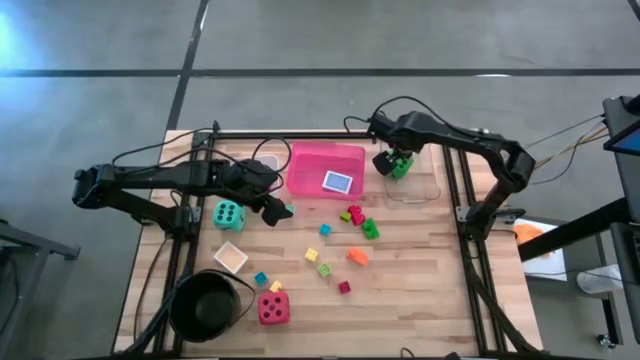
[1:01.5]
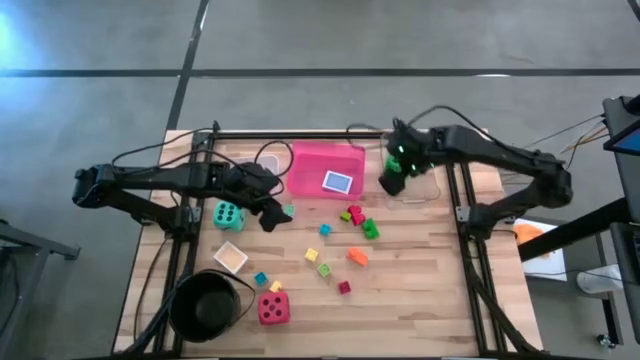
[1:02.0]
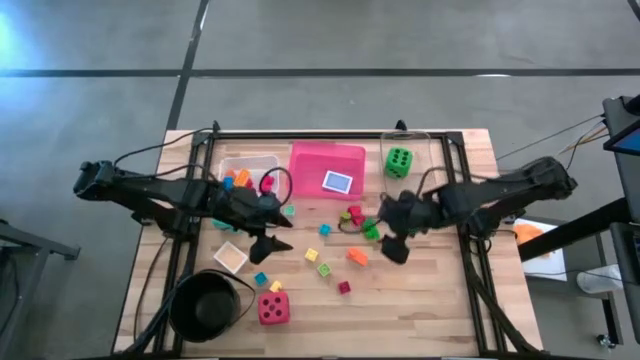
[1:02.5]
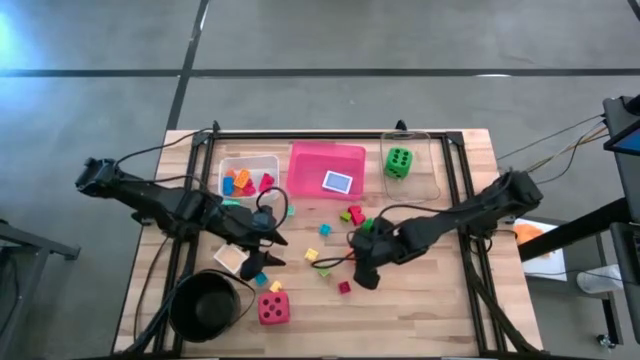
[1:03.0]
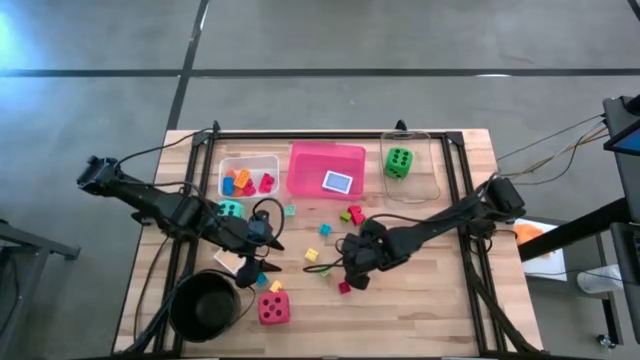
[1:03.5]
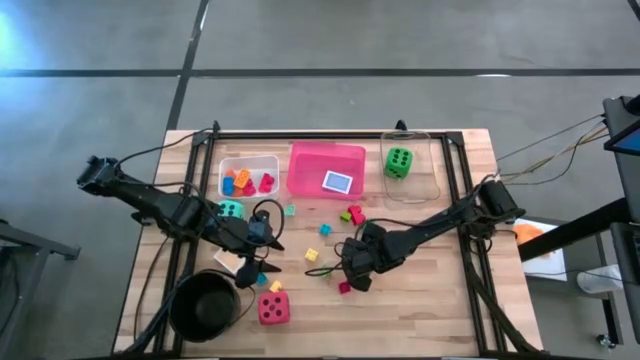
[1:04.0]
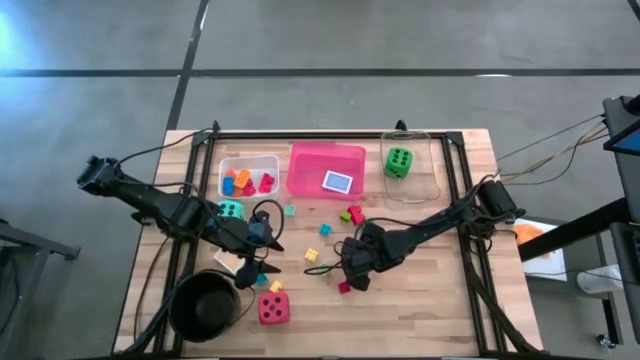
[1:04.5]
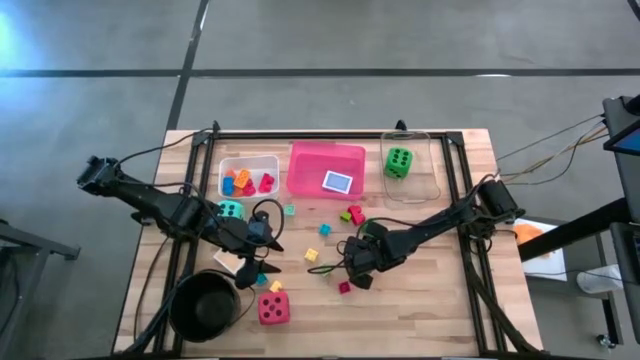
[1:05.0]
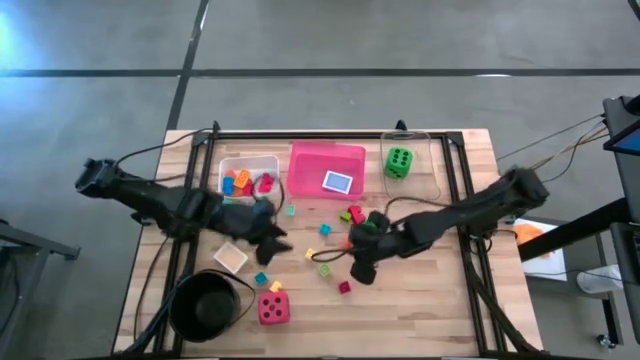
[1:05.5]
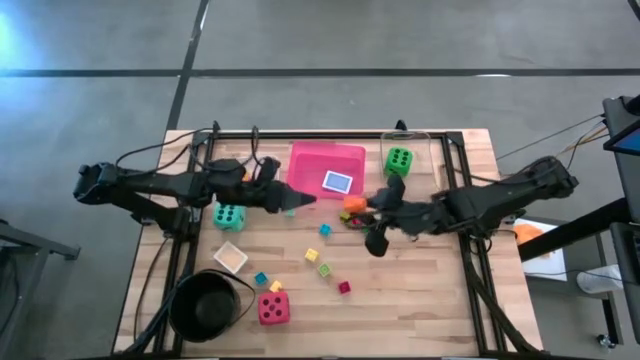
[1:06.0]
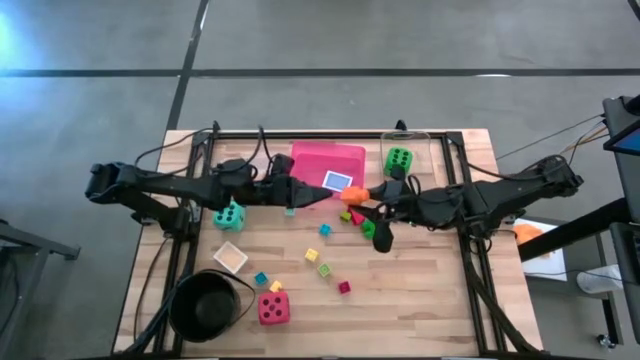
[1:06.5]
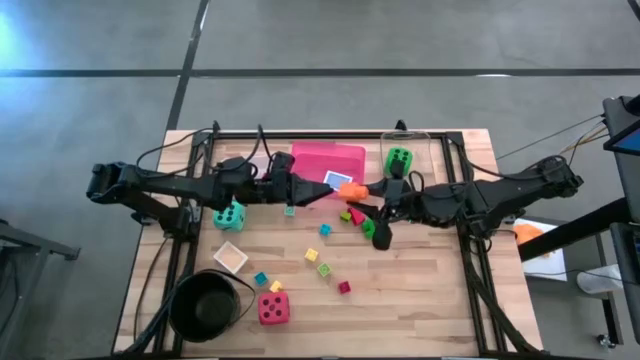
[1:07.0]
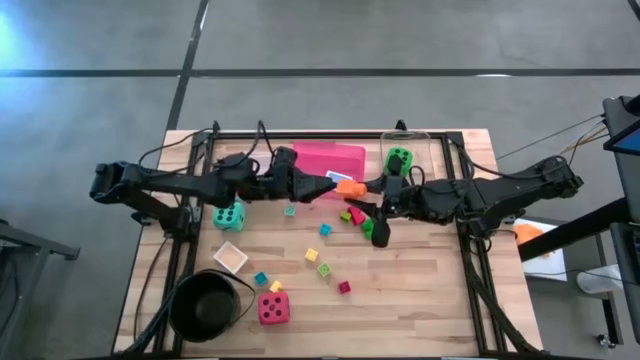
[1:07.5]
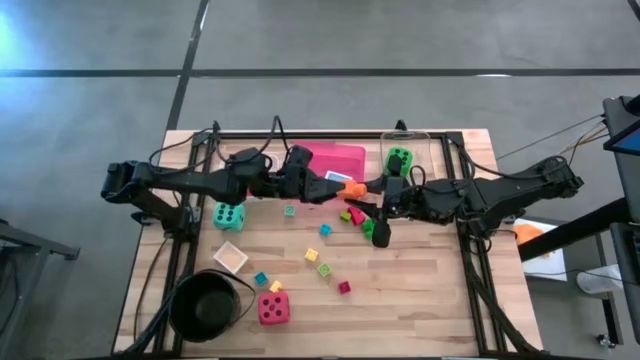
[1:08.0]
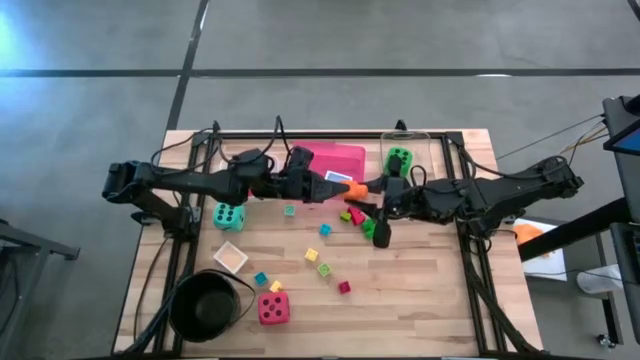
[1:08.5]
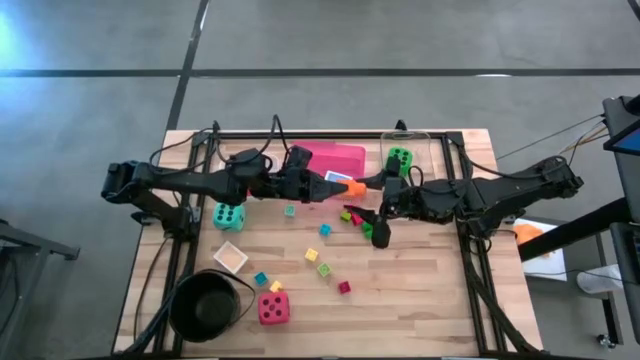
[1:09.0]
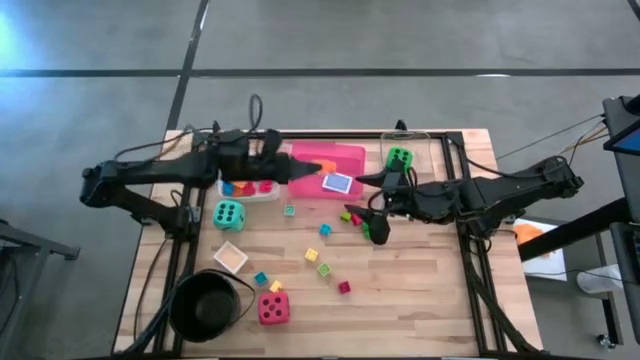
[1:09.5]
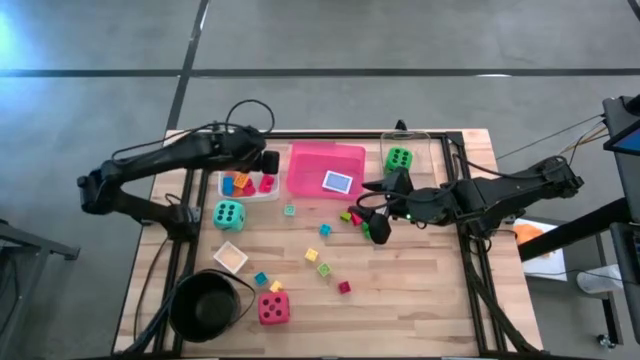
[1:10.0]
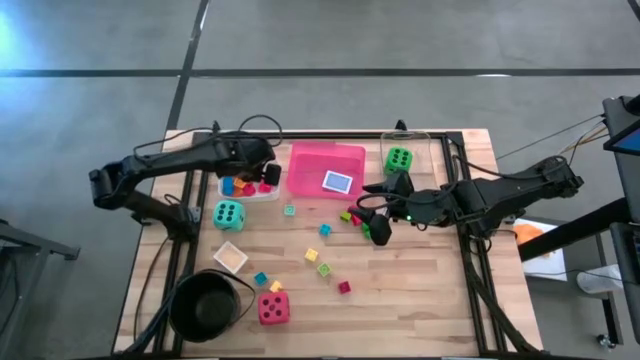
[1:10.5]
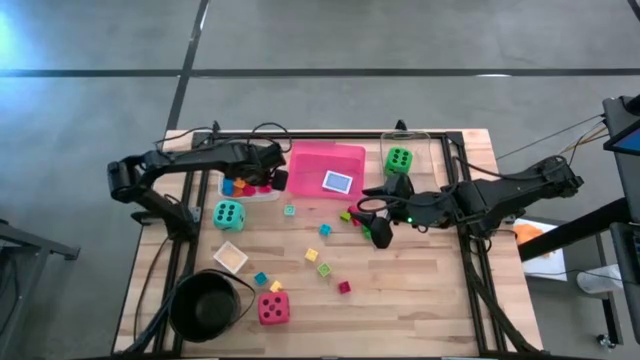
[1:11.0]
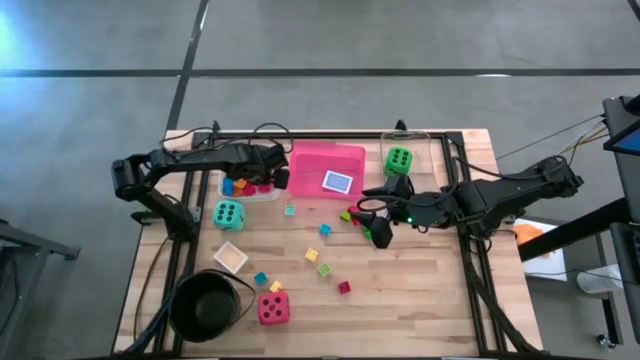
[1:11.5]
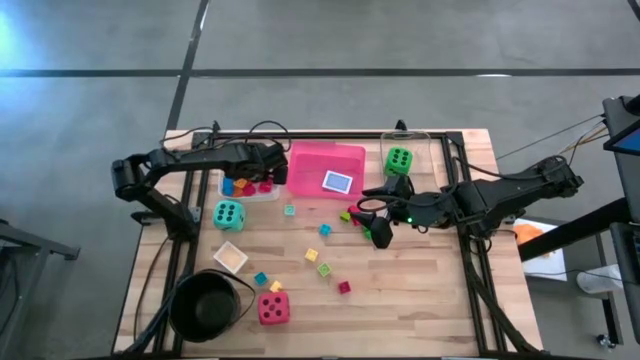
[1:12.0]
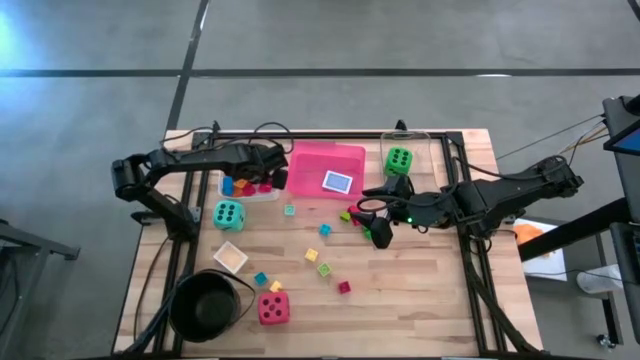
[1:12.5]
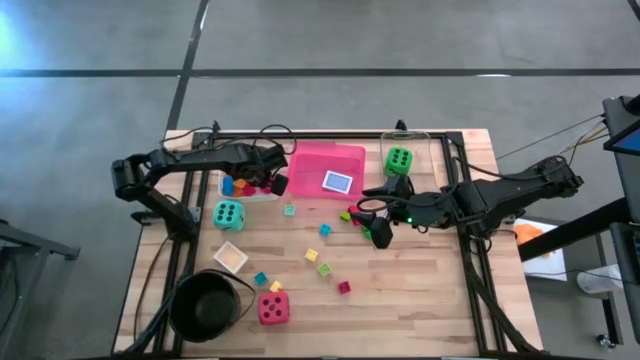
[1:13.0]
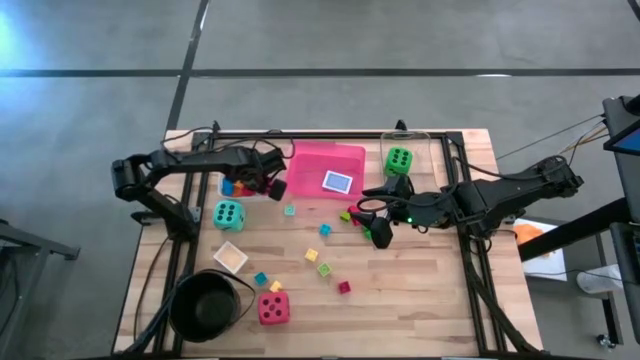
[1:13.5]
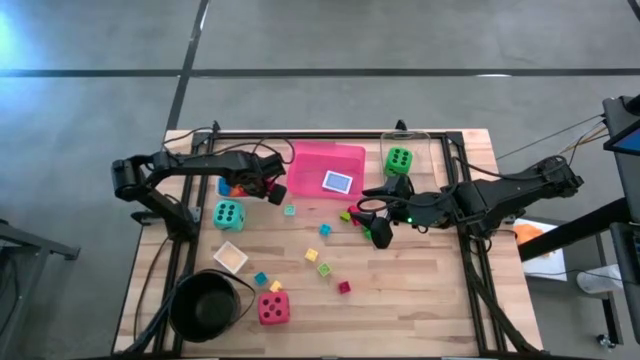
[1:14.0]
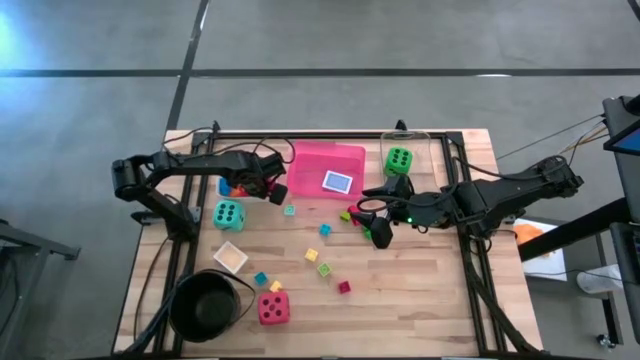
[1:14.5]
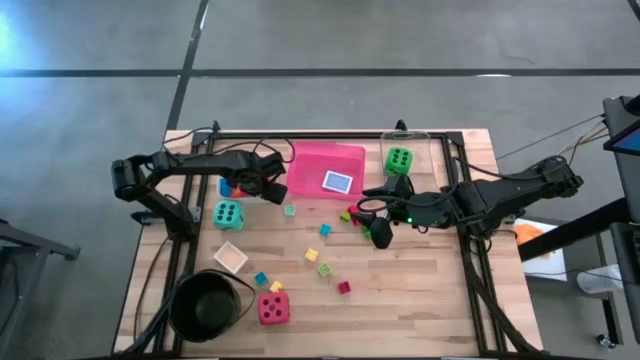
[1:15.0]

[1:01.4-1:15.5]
Task: Pick & Place Toys
Put the orange game piece into the white bin

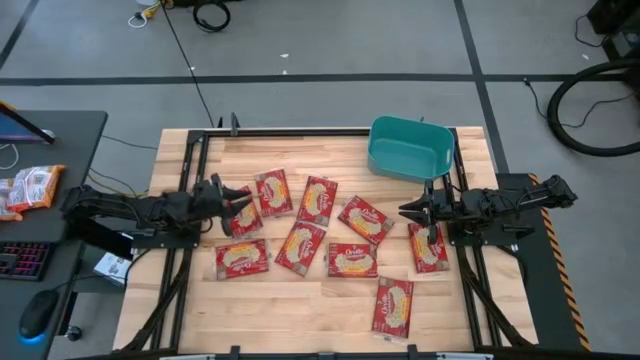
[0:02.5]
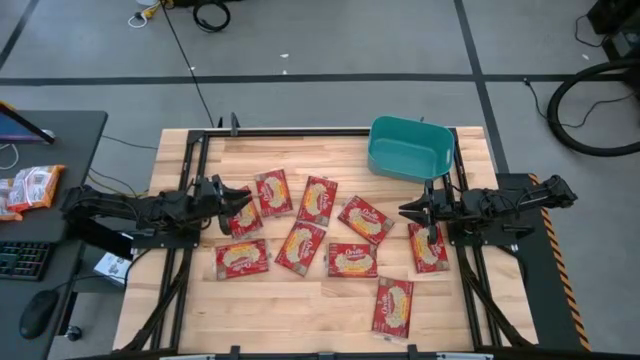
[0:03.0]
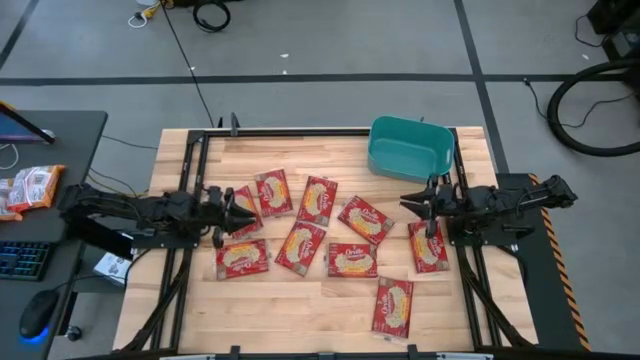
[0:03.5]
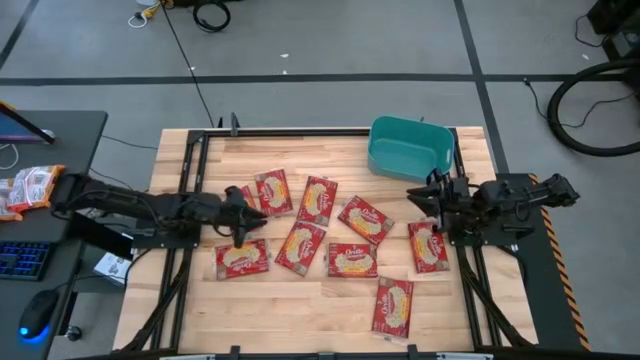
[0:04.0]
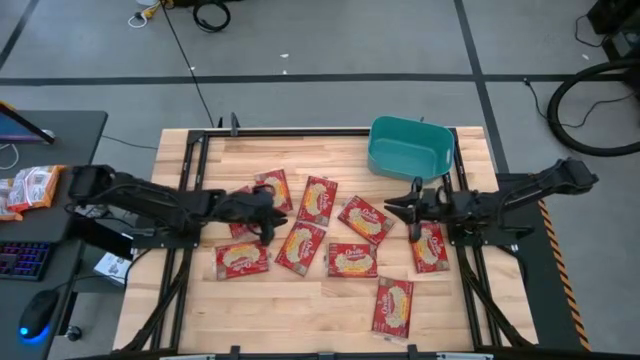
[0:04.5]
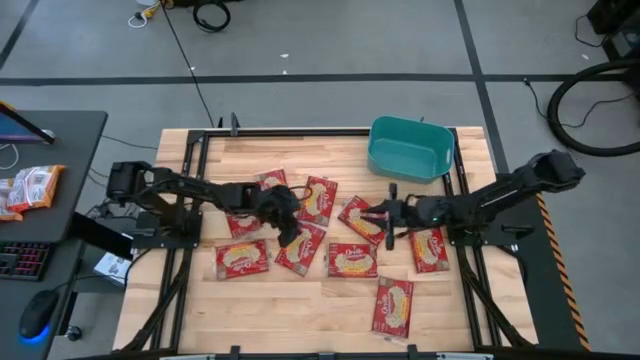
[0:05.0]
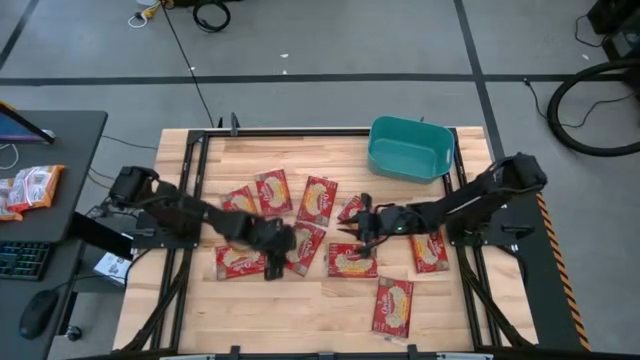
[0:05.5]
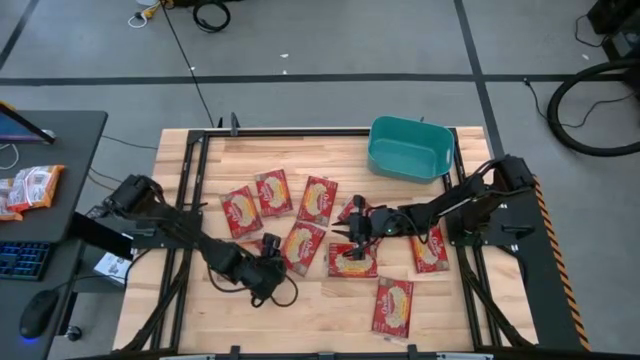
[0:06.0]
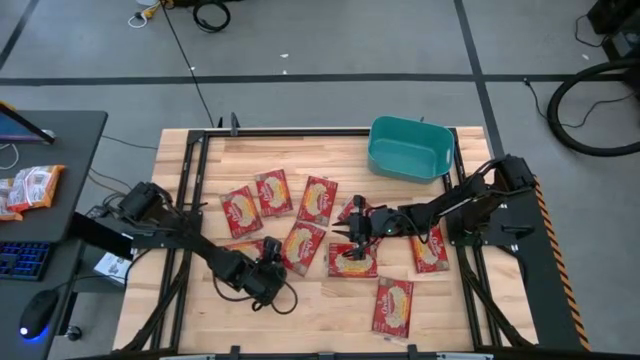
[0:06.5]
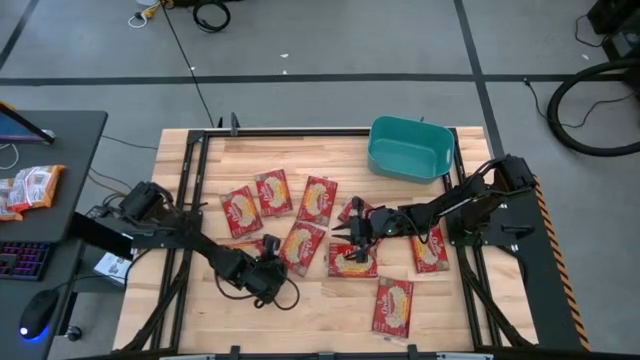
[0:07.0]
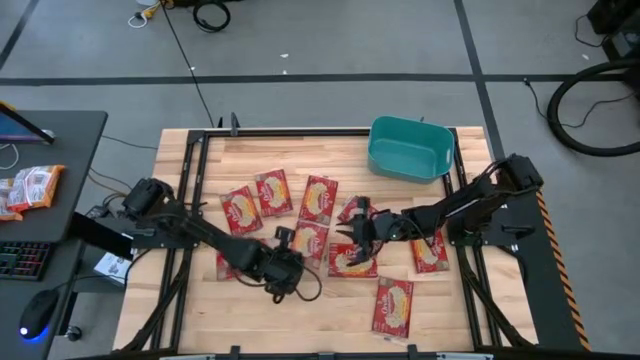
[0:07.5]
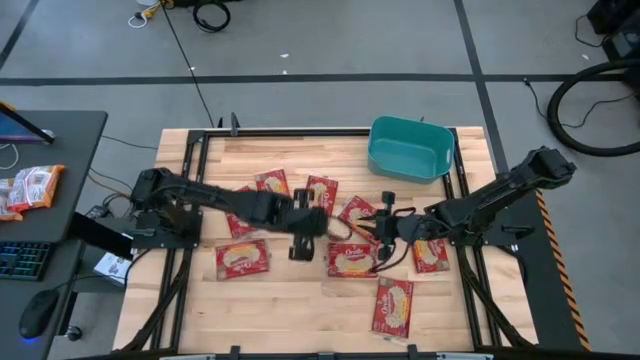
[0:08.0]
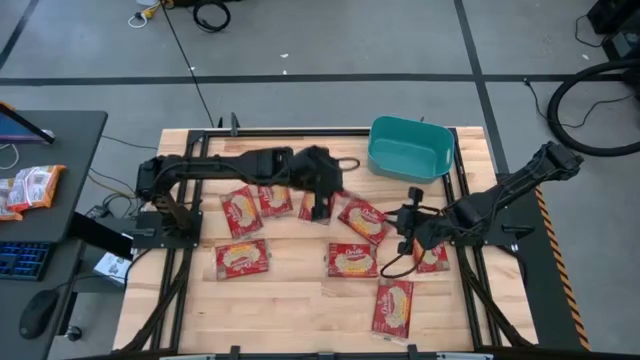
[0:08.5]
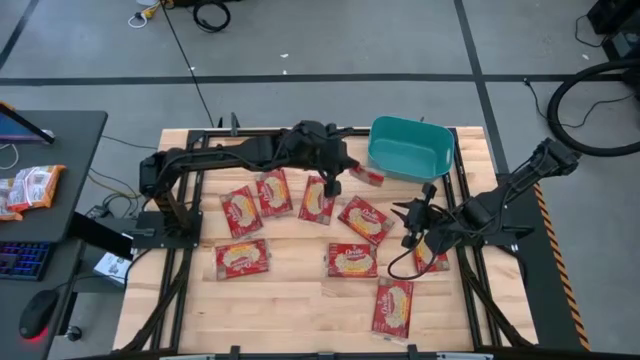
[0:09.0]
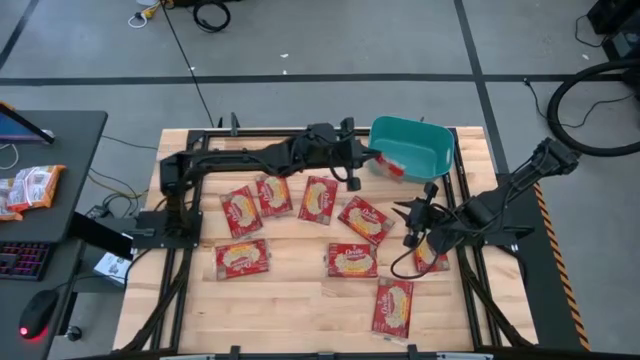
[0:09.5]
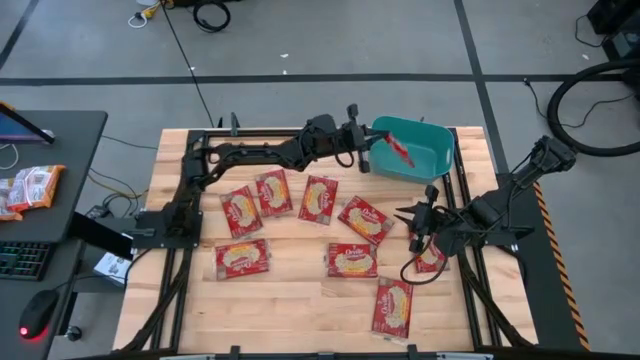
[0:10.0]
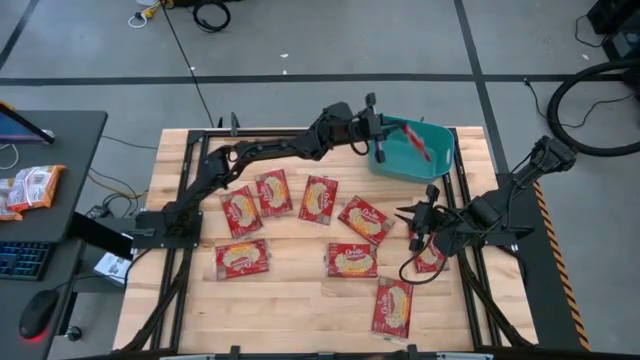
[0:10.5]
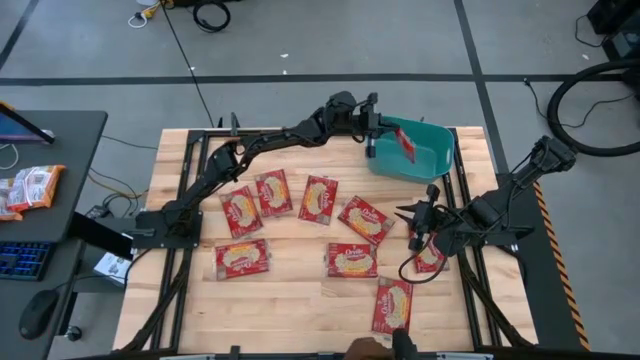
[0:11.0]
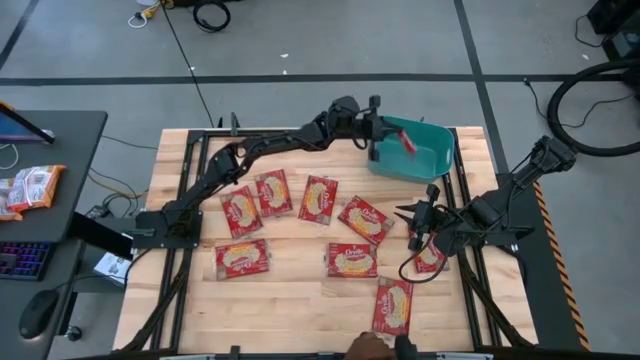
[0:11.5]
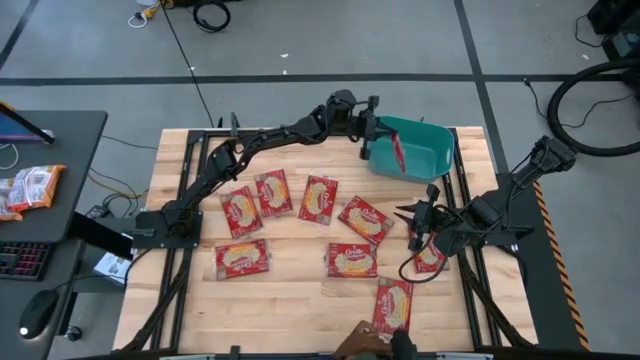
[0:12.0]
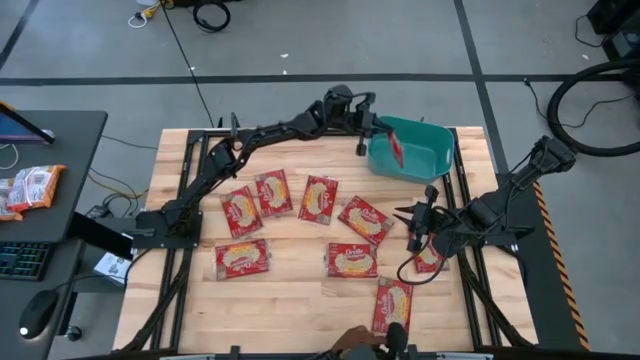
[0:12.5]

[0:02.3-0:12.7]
Task: Sort popcorn bags into baskets
Put the popcorn bag into the blue bin
